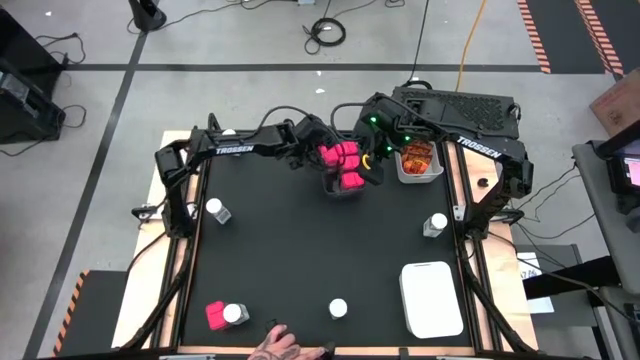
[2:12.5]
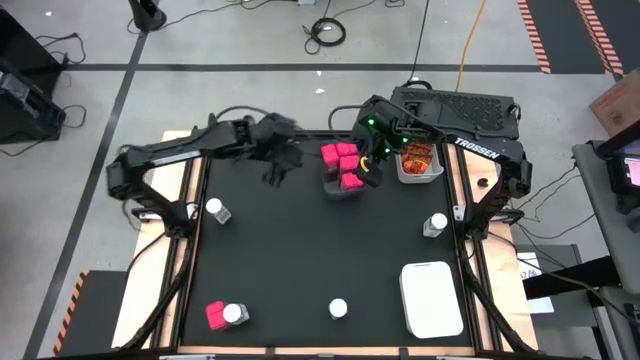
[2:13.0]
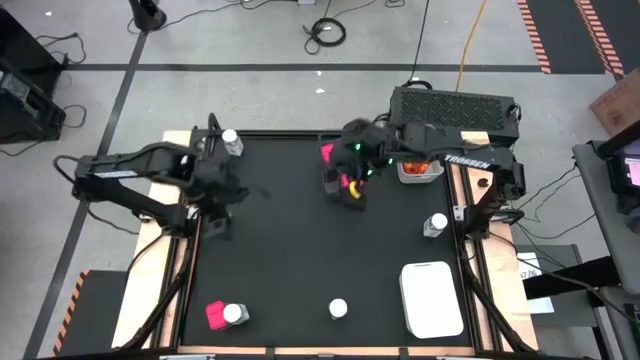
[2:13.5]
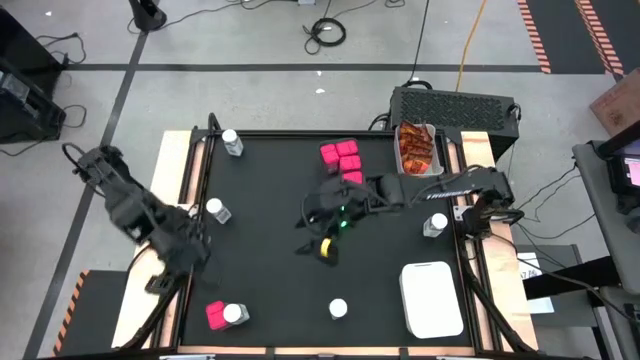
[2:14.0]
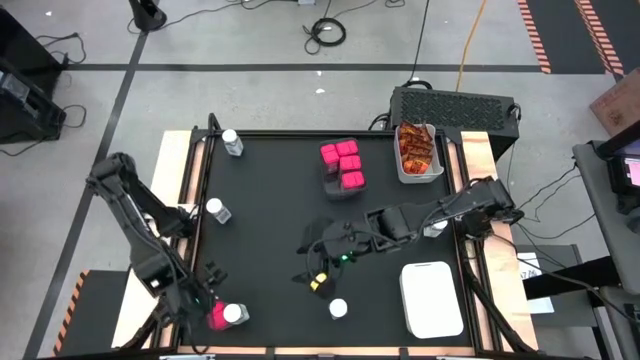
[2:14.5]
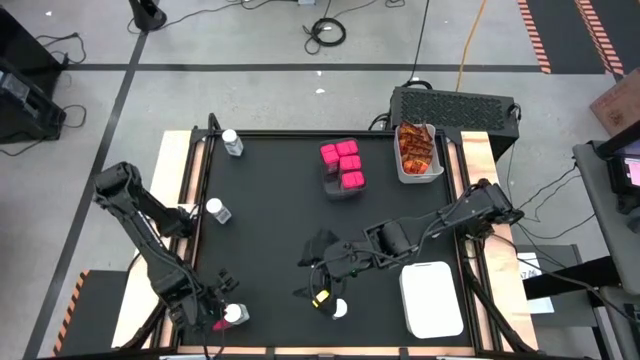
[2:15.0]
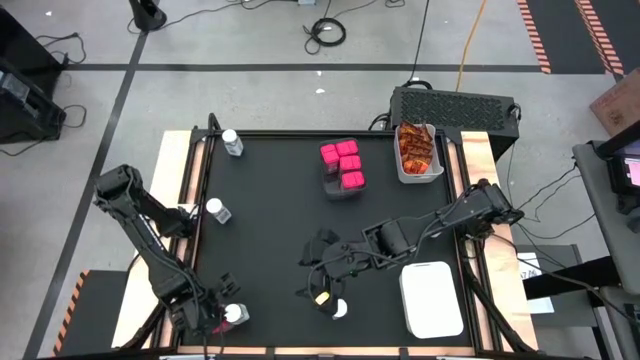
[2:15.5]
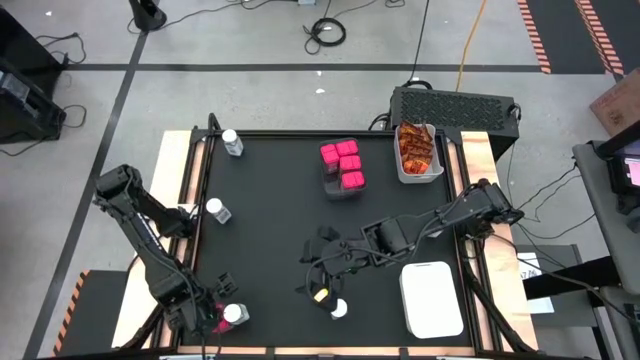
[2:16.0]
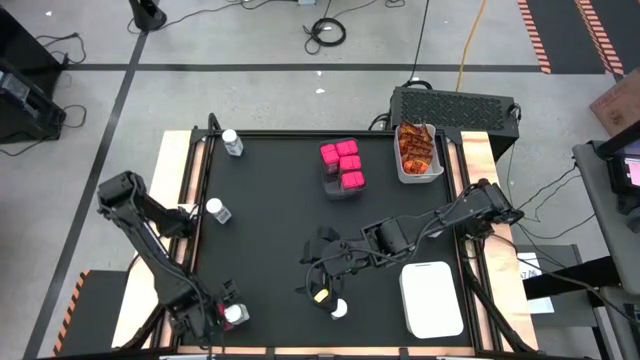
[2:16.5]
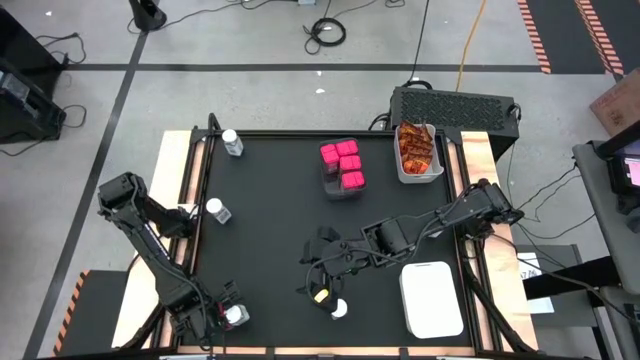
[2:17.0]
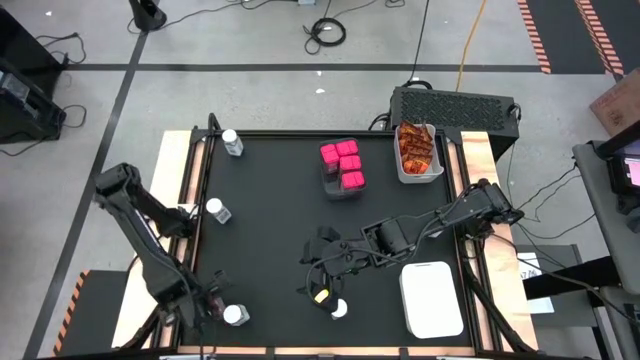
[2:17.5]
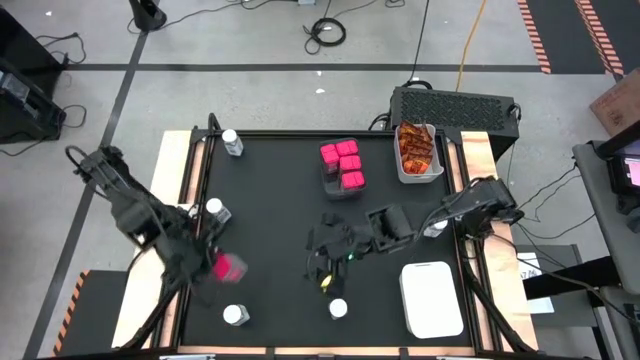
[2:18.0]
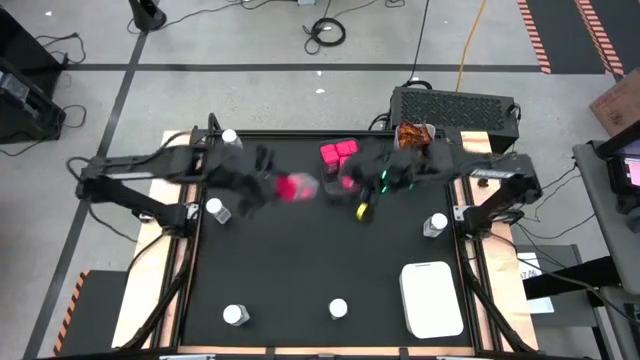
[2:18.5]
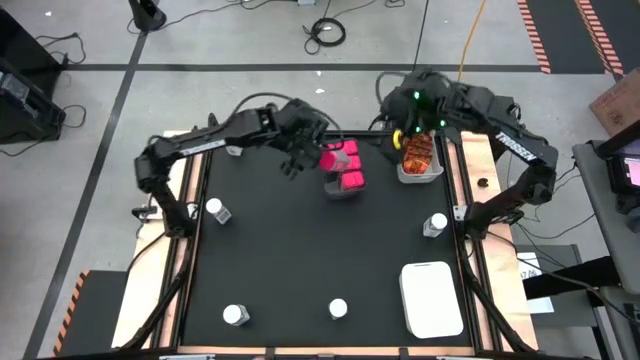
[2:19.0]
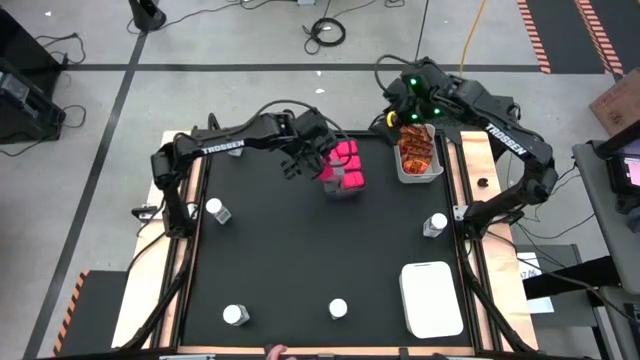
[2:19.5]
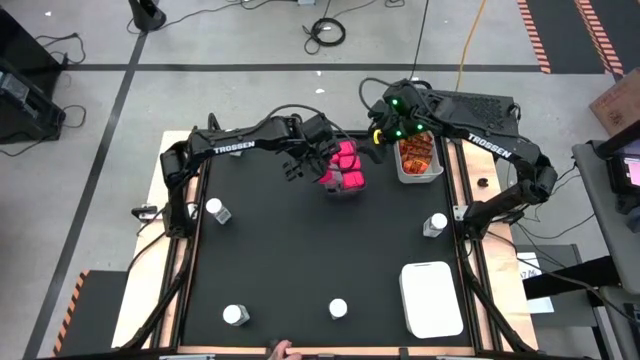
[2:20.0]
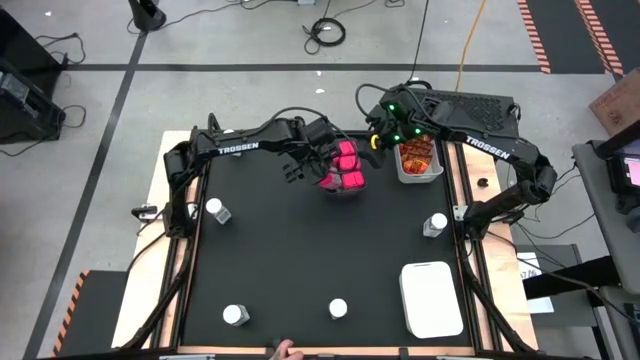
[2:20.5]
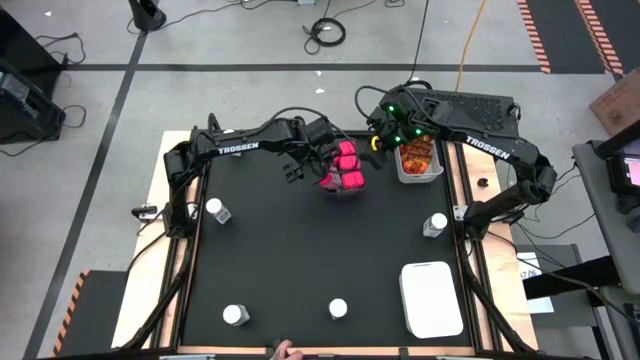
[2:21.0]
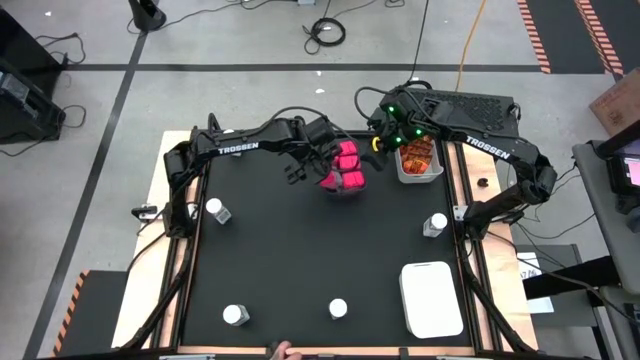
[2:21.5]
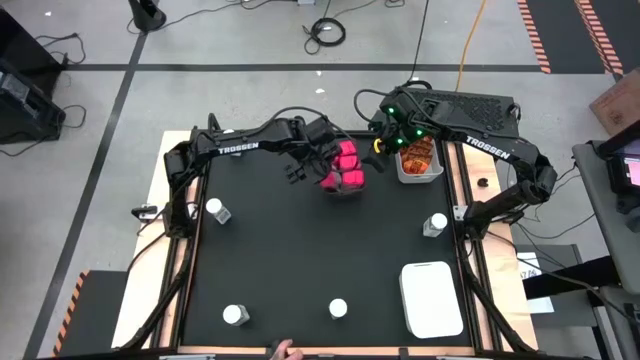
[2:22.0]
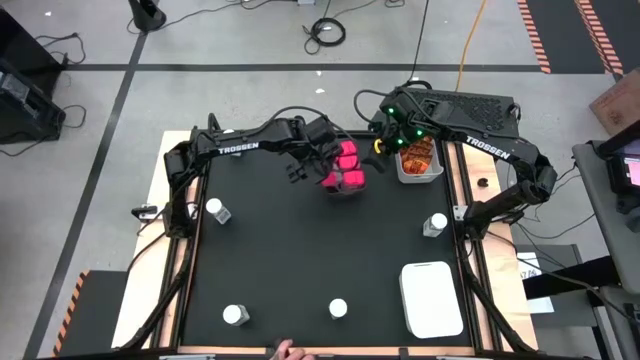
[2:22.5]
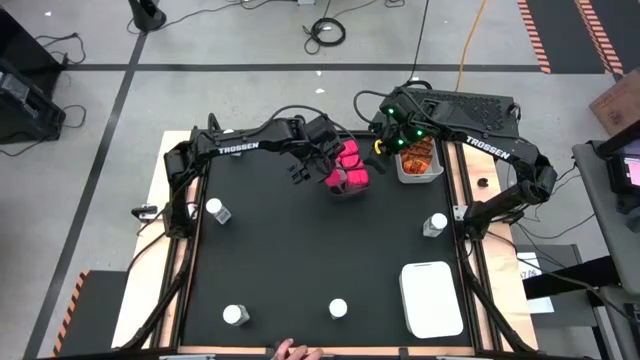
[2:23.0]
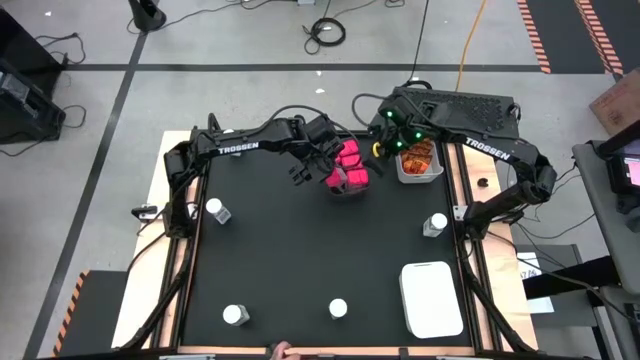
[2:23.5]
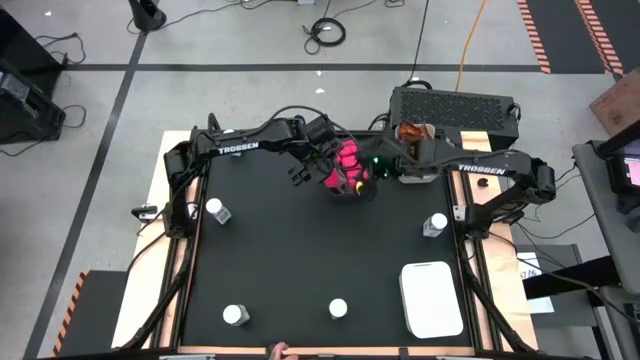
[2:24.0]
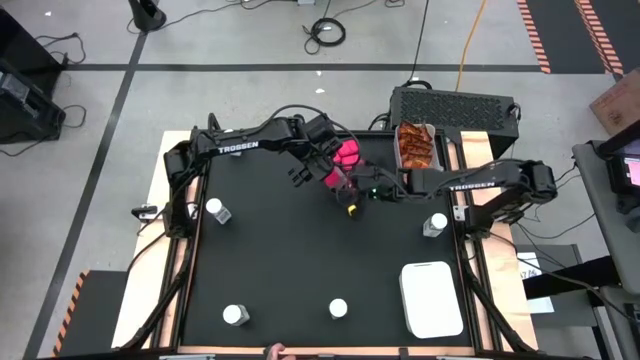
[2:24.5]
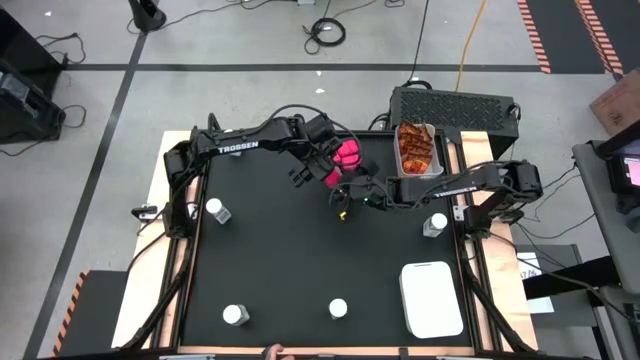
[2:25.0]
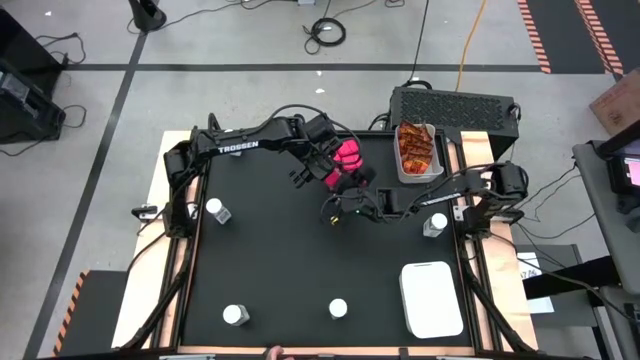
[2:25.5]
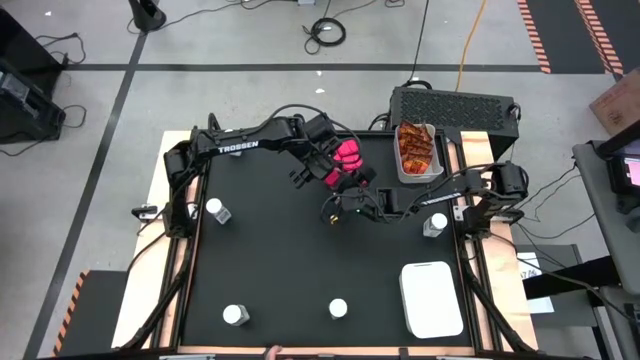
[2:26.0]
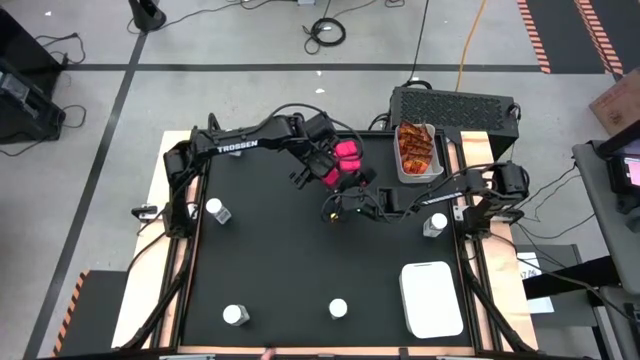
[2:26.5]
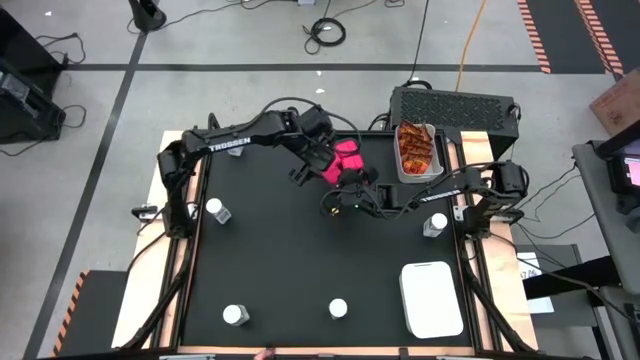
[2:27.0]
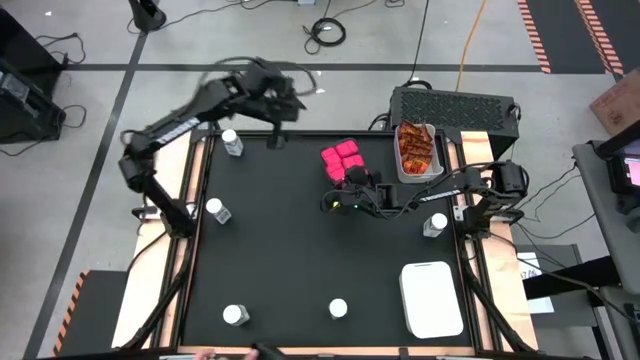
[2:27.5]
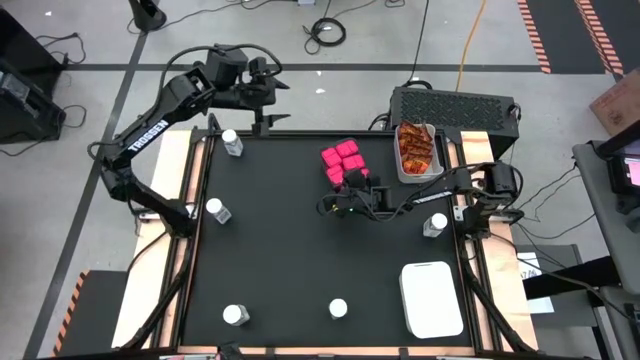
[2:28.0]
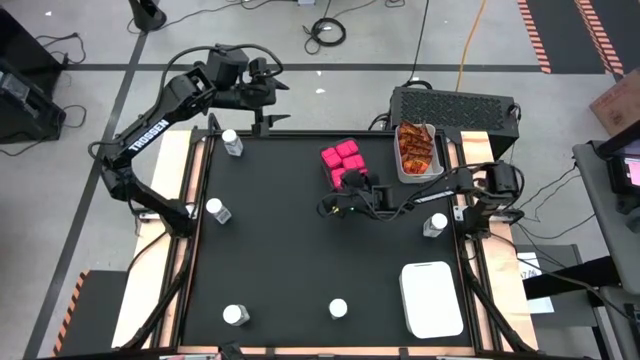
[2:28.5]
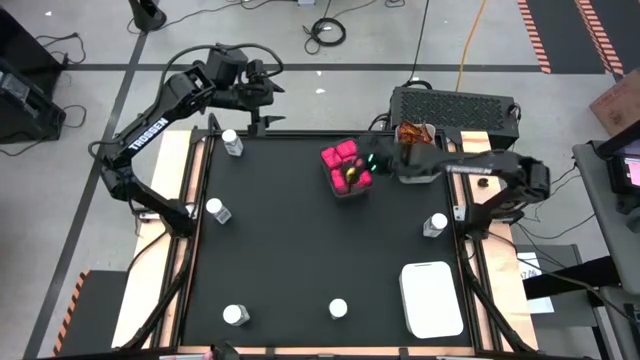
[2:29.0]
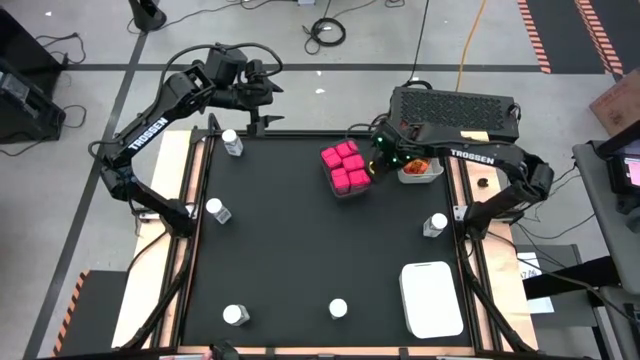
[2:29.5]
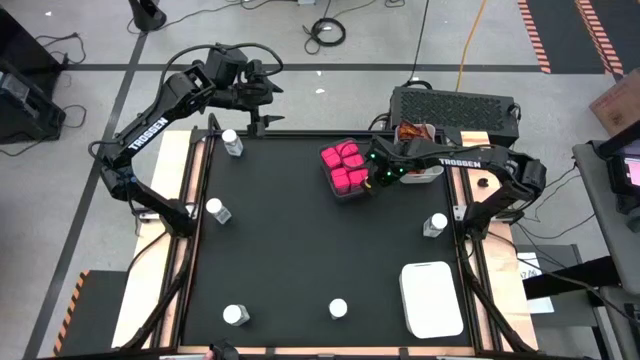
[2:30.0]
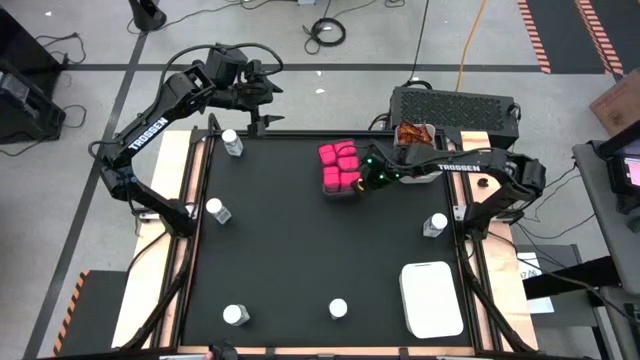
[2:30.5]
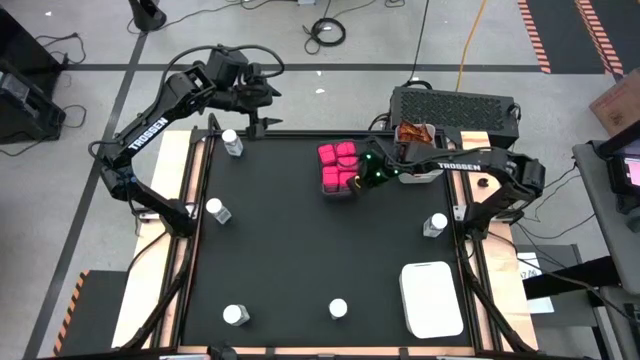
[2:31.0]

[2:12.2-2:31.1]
Task: Sort spices by type
Put the red seasoning can into the black transparent bin
